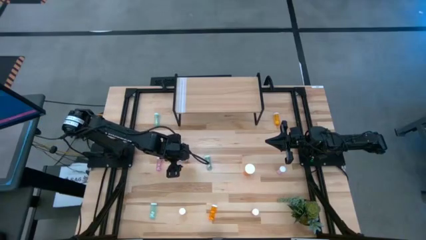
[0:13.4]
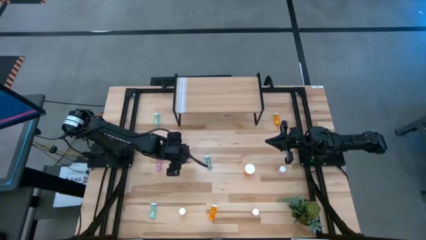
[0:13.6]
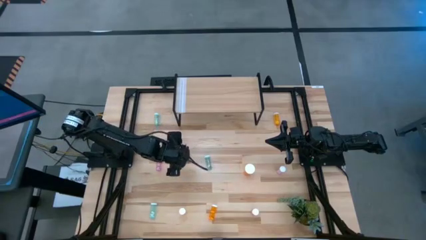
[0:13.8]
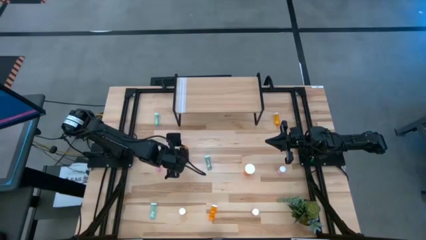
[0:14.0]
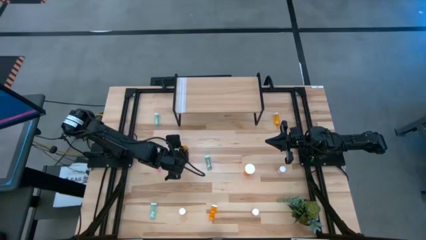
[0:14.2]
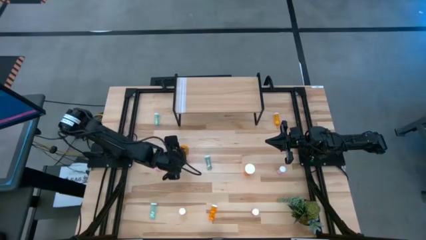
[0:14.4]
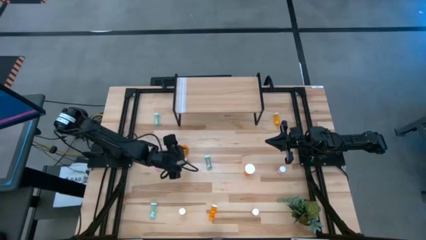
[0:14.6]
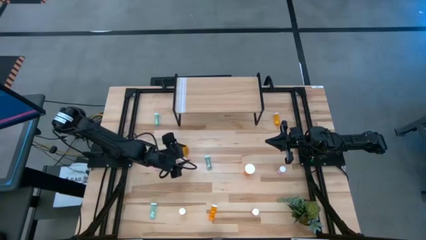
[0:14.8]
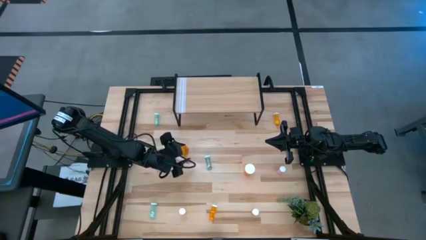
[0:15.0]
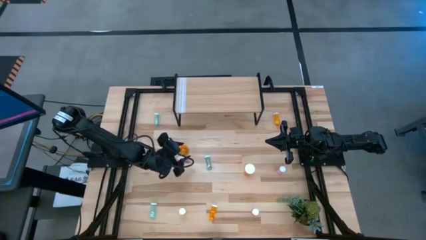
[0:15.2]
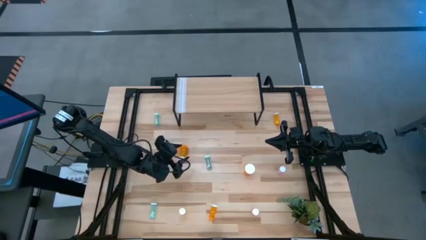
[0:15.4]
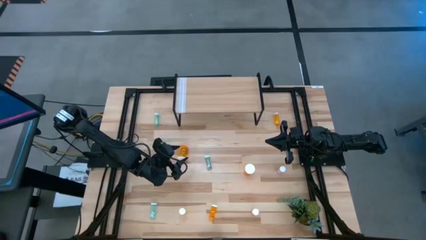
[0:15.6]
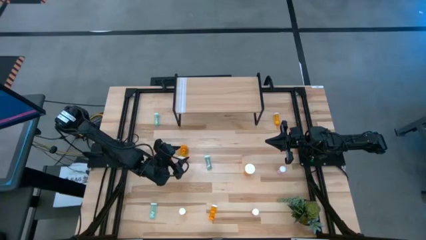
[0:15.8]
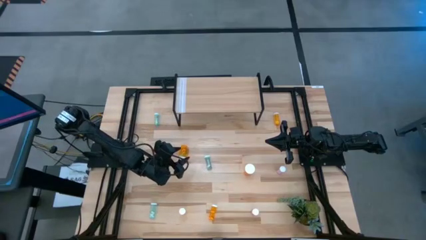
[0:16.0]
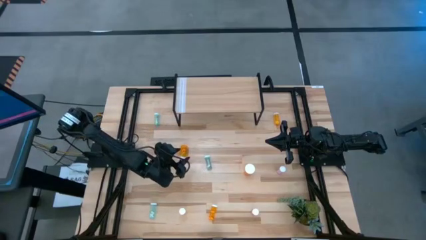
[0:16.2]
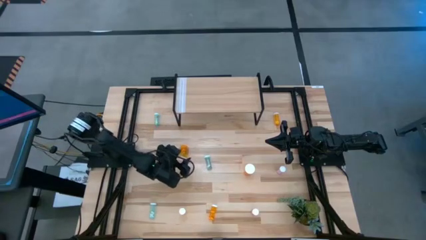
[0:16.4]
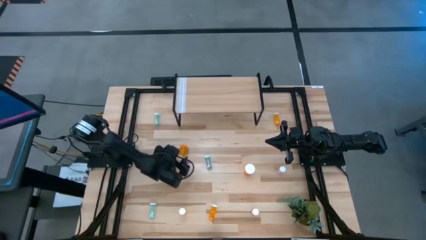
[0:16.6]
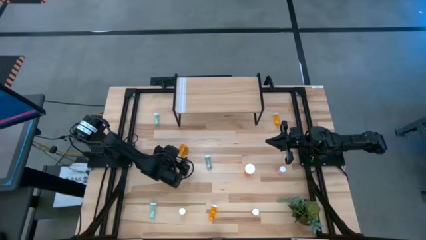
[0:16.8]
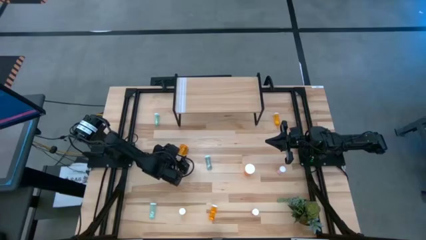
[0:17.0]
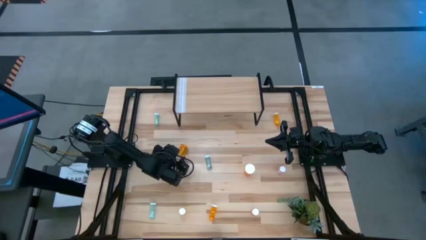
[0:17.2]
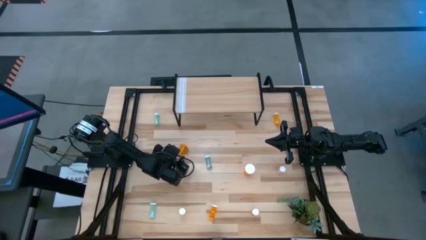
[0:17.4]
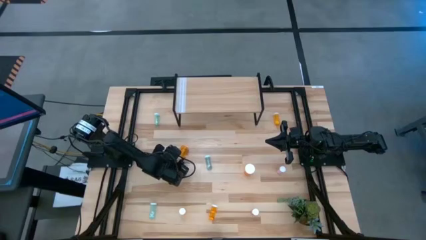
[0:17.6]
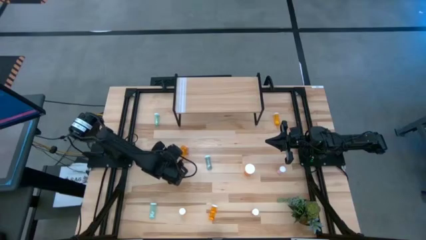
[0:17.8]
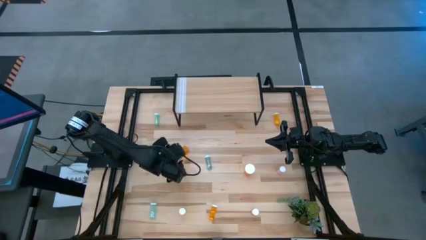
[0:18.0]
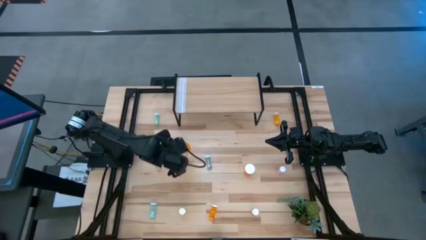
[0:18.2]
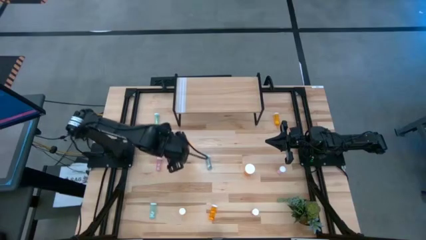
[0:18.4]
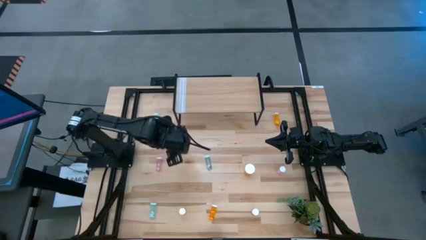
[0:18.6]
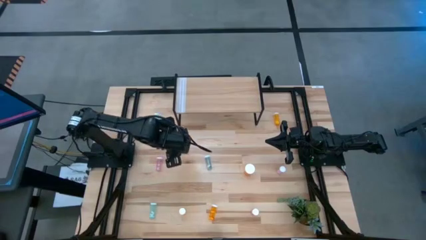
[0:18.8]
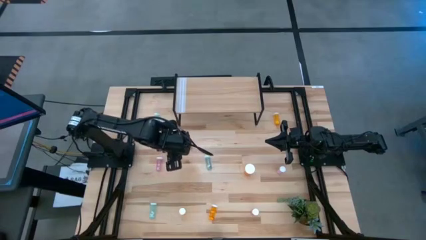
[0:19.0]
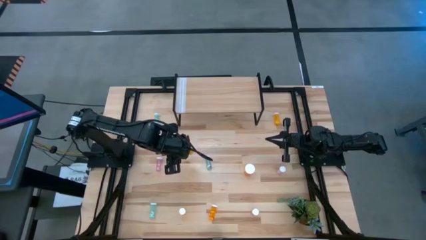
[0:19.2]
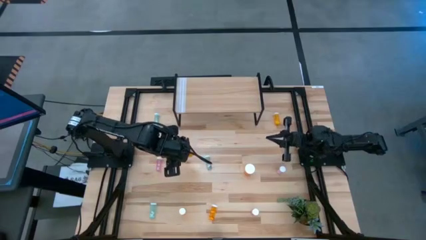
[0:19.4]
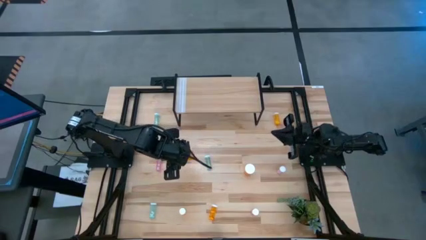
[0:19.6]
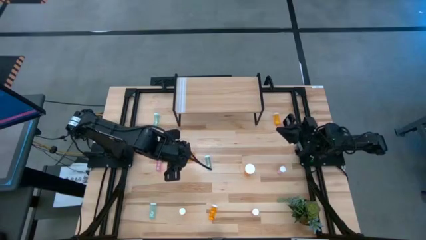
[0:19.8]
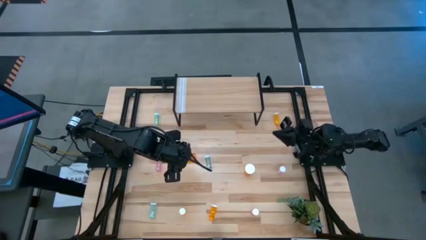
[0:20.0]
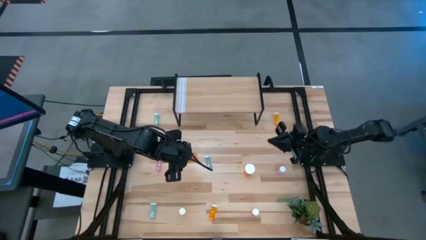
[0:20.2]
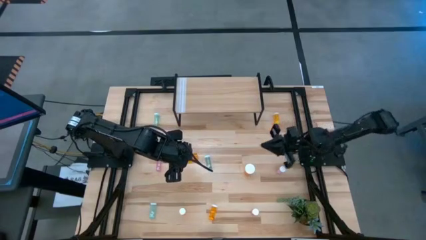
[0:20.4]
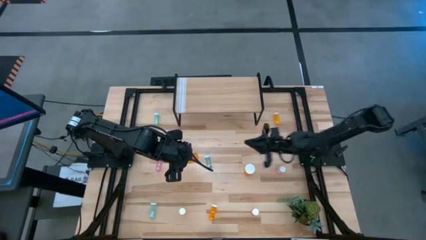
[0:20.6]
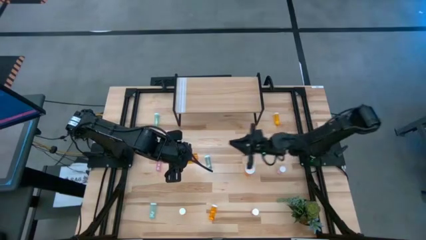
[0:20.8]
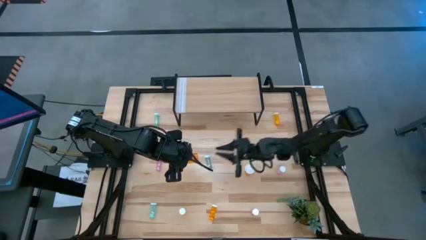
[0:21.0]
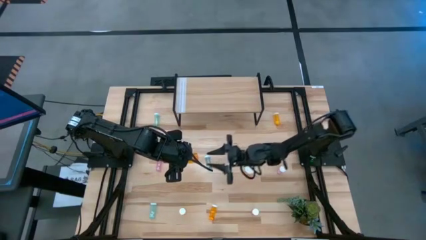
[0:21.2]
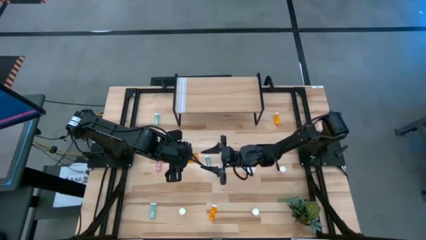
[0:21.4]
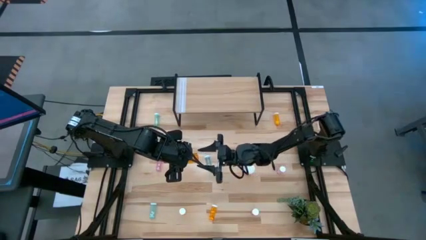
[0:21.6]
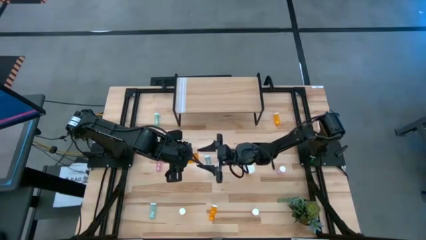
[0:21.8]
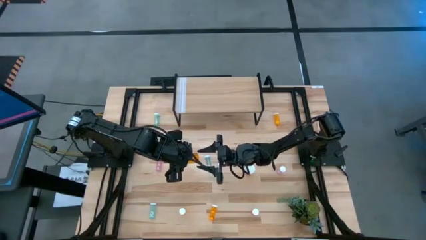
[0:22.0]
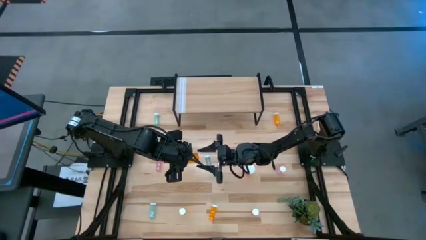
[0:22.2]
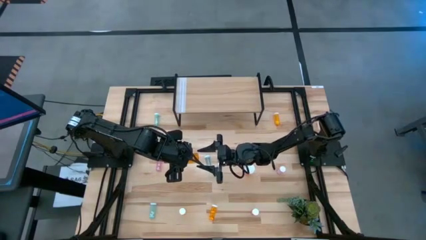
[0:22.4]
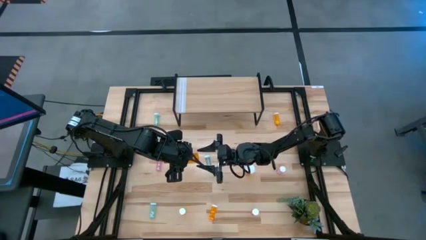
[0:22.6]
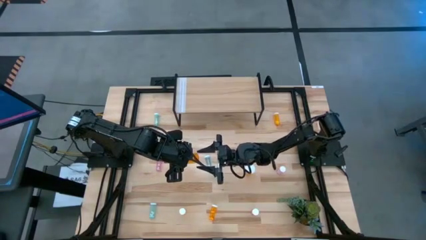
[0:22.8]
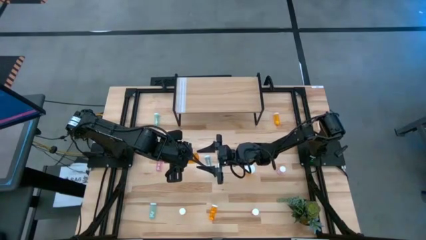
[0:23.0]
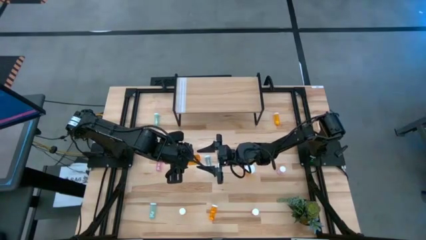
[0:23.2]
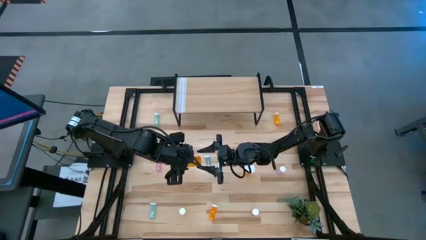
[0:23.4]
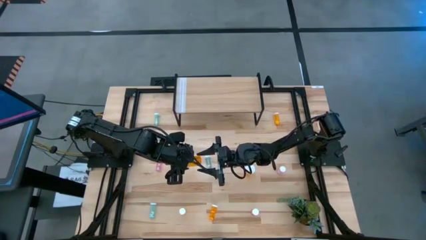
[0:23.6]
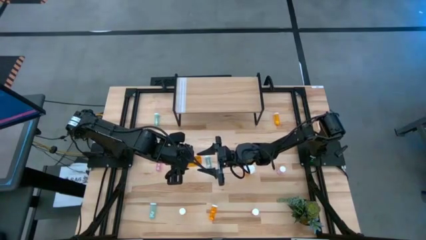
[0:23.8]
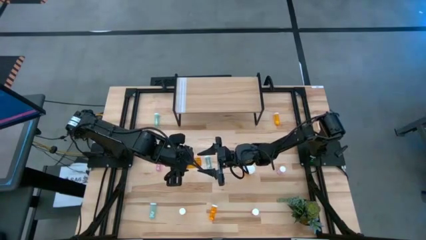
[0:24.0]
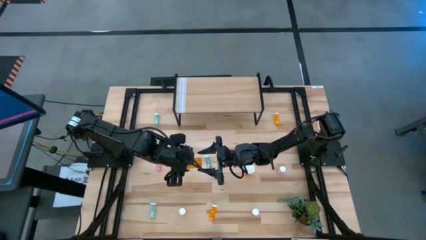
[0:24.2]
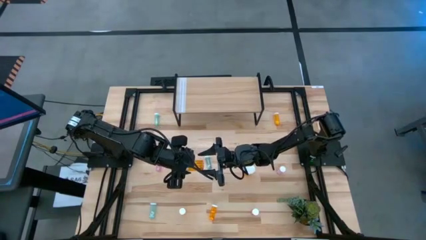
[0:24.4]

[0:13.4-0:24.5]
Task: Pick and place medicine bottles onto shelf by color
Put the left large orange pill bottle on the shelf
